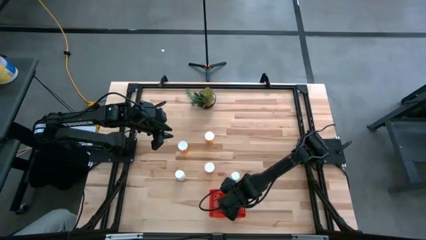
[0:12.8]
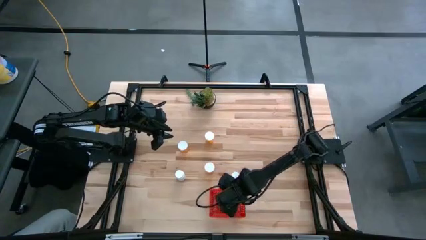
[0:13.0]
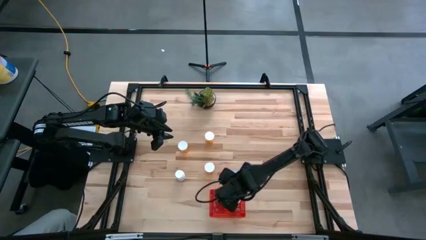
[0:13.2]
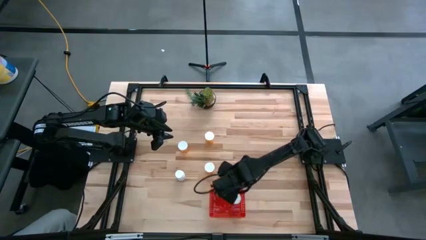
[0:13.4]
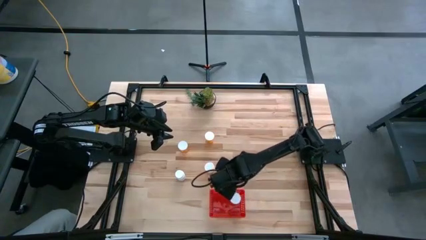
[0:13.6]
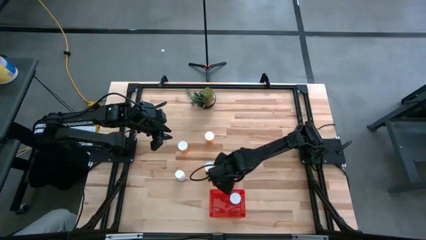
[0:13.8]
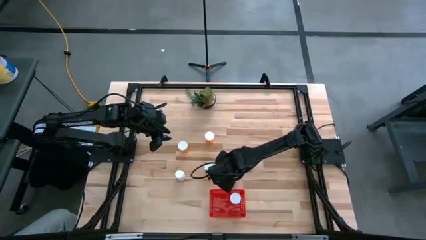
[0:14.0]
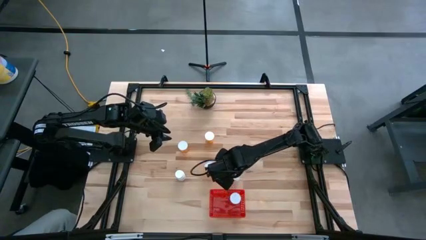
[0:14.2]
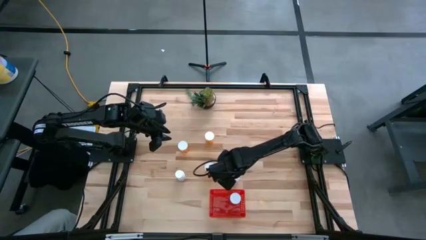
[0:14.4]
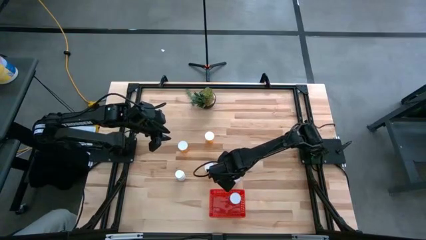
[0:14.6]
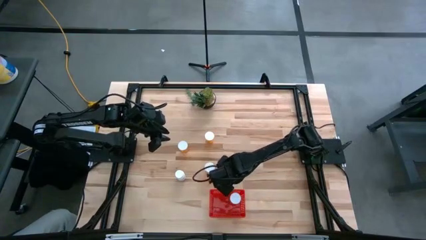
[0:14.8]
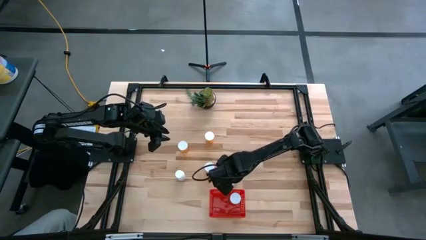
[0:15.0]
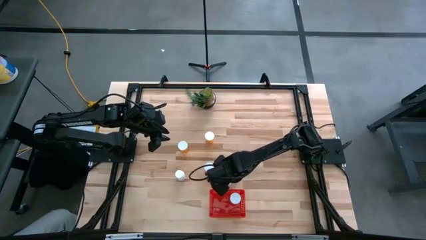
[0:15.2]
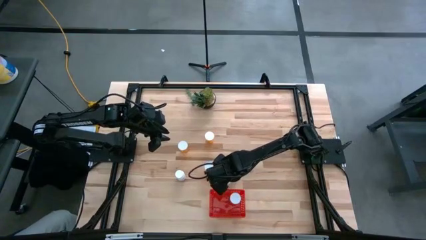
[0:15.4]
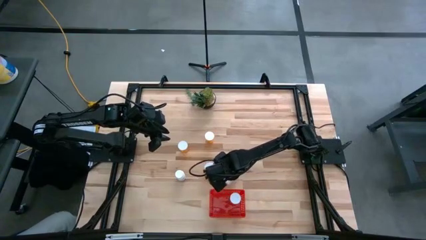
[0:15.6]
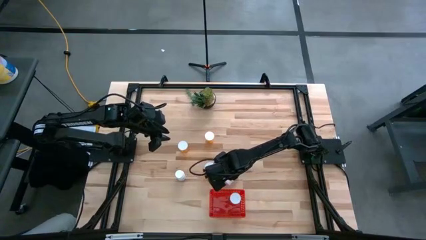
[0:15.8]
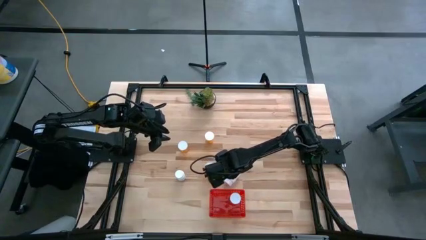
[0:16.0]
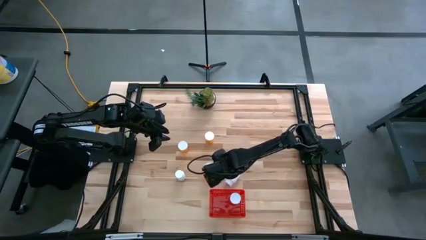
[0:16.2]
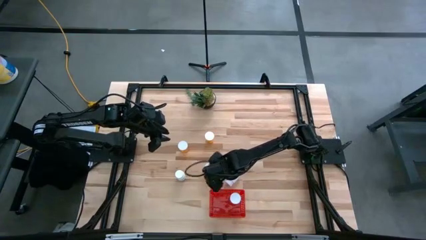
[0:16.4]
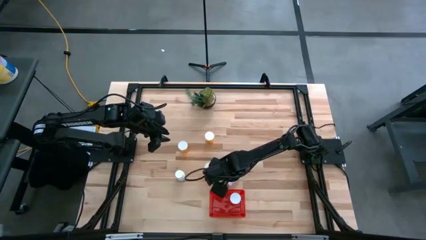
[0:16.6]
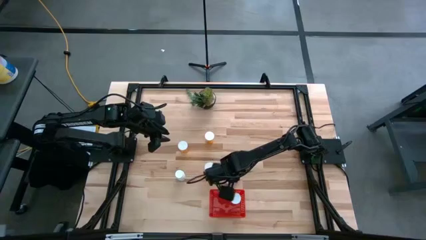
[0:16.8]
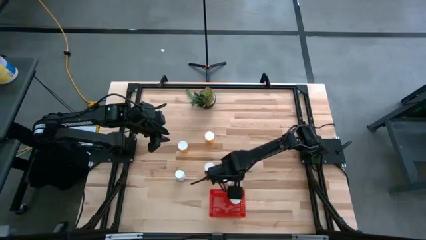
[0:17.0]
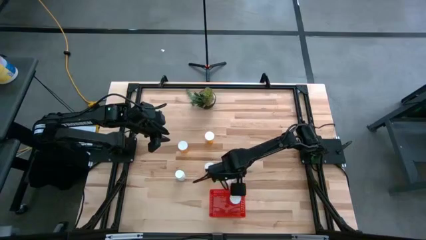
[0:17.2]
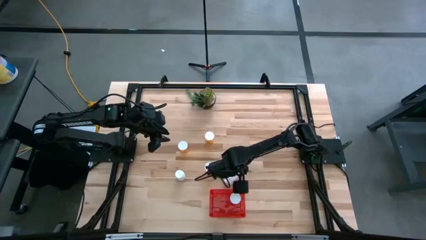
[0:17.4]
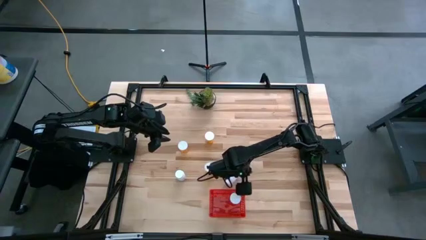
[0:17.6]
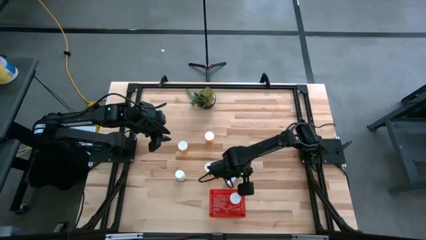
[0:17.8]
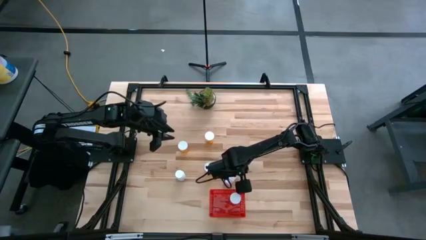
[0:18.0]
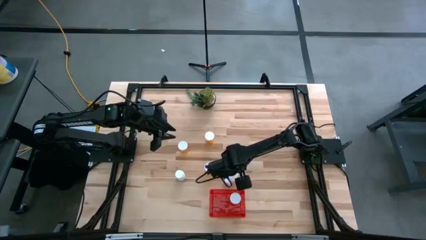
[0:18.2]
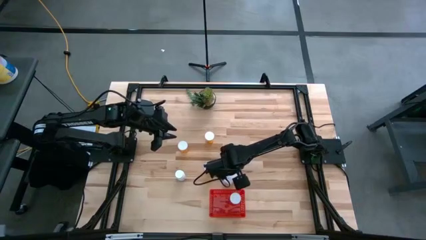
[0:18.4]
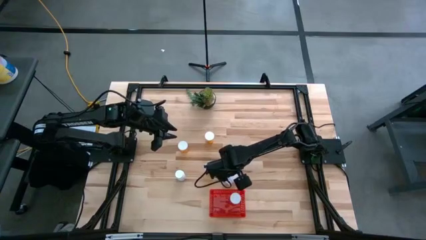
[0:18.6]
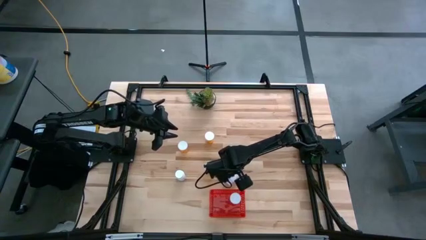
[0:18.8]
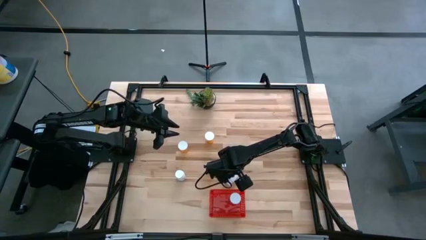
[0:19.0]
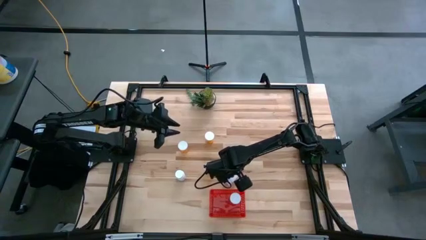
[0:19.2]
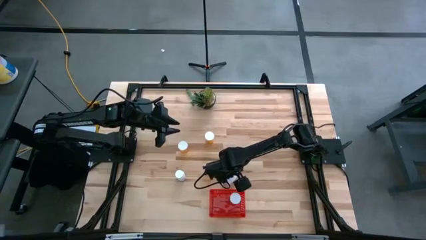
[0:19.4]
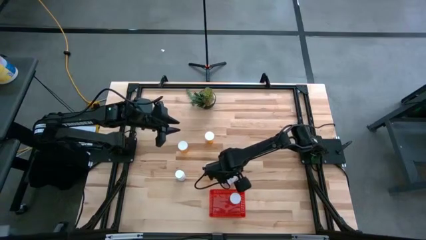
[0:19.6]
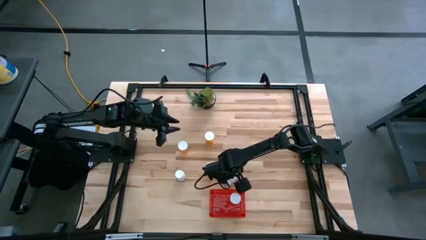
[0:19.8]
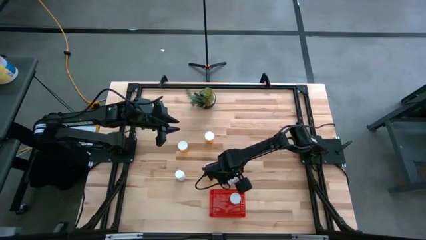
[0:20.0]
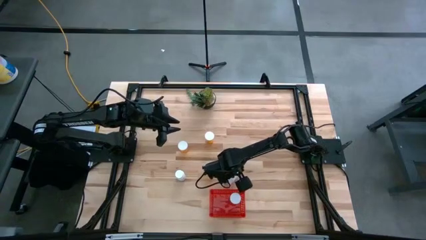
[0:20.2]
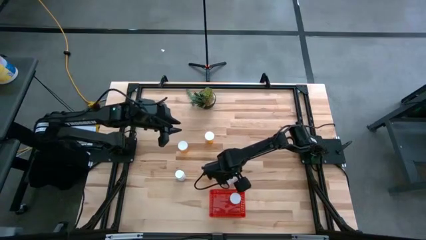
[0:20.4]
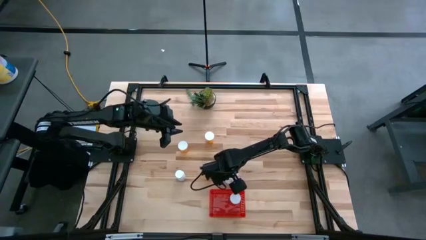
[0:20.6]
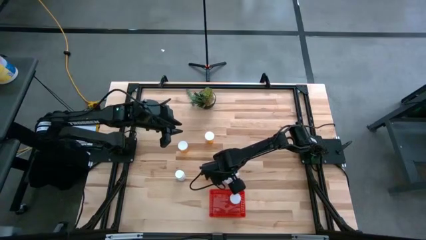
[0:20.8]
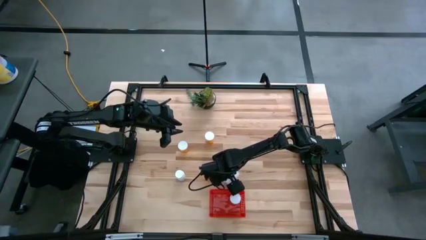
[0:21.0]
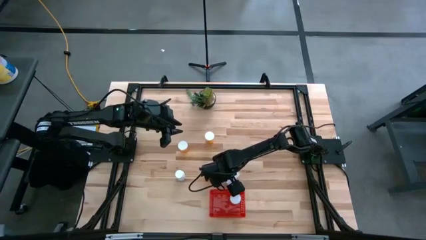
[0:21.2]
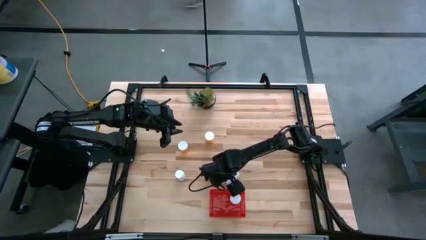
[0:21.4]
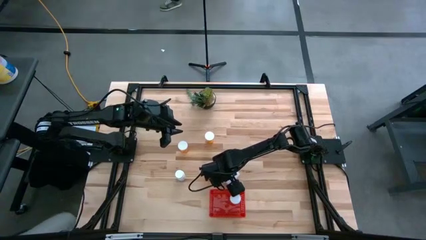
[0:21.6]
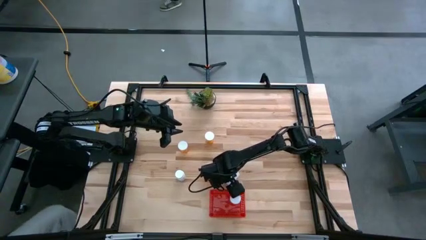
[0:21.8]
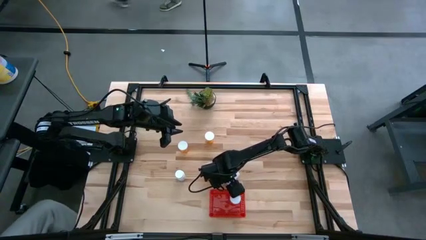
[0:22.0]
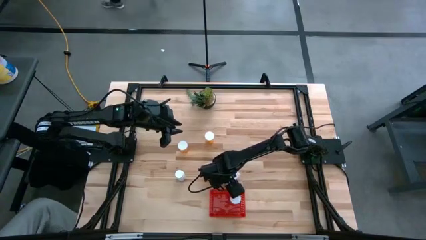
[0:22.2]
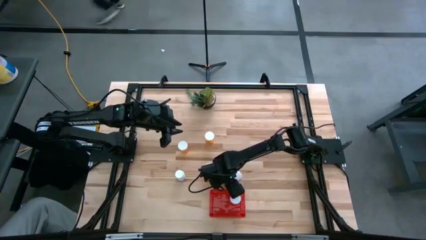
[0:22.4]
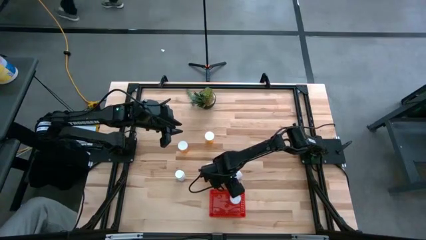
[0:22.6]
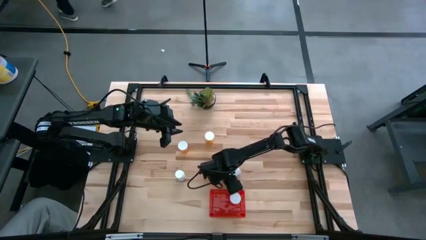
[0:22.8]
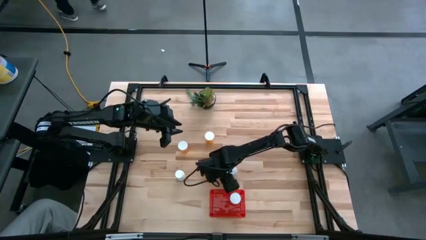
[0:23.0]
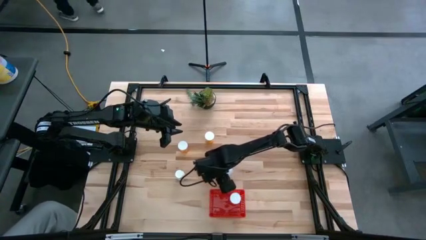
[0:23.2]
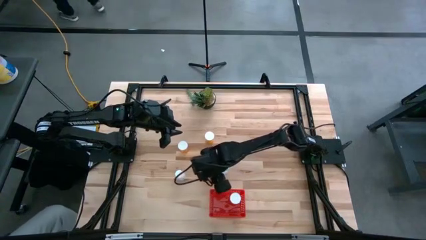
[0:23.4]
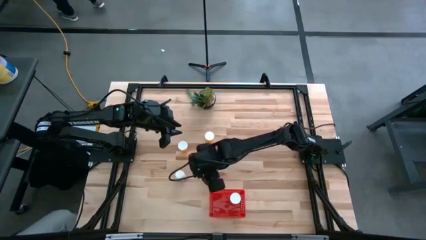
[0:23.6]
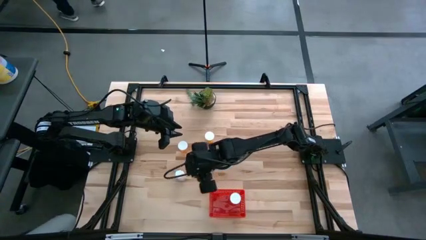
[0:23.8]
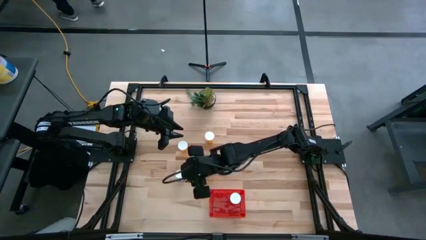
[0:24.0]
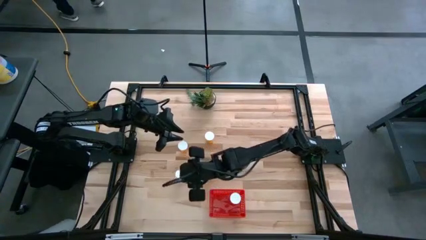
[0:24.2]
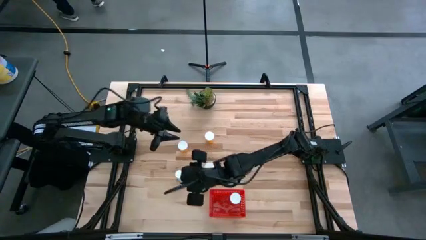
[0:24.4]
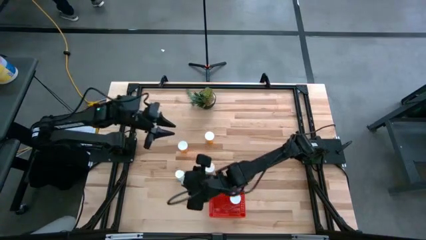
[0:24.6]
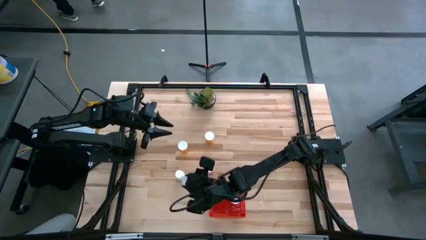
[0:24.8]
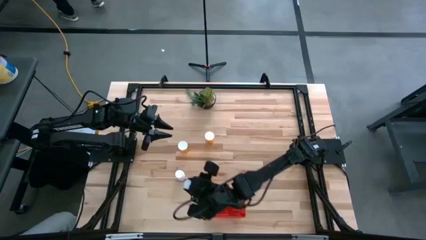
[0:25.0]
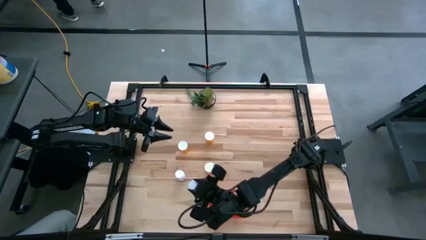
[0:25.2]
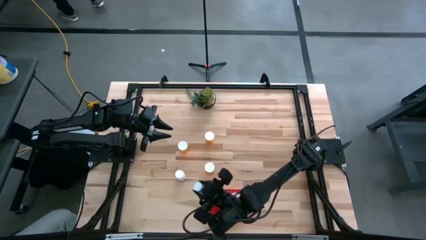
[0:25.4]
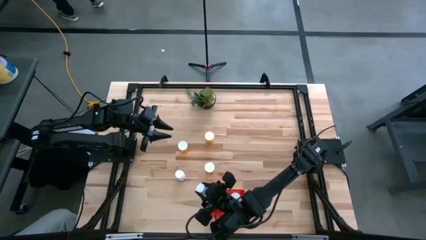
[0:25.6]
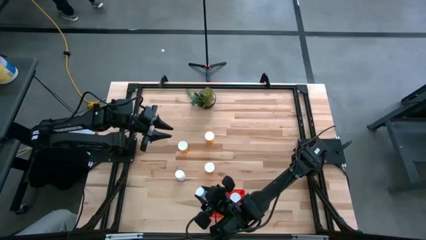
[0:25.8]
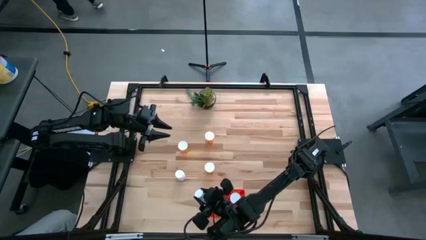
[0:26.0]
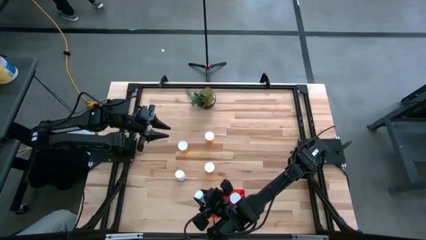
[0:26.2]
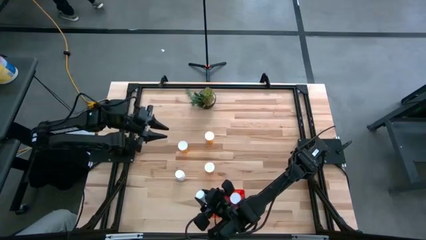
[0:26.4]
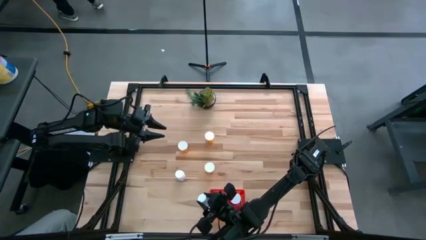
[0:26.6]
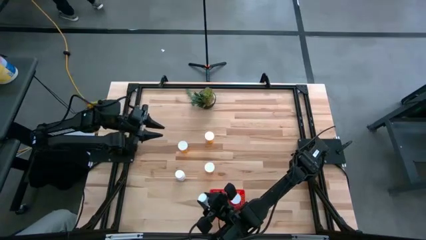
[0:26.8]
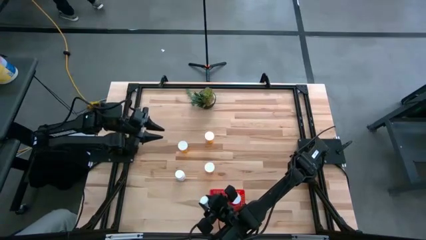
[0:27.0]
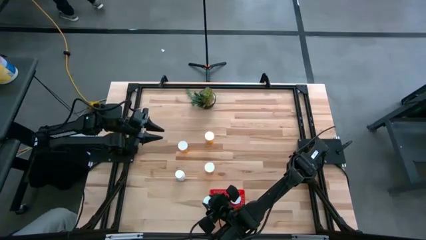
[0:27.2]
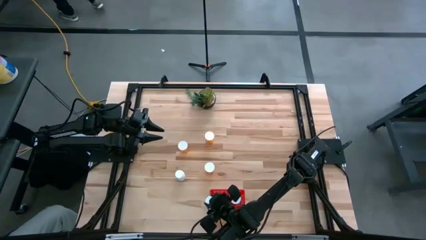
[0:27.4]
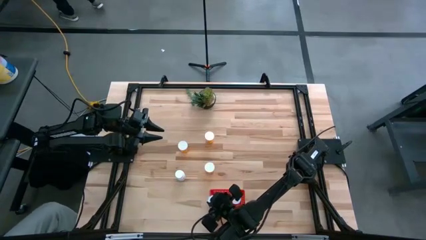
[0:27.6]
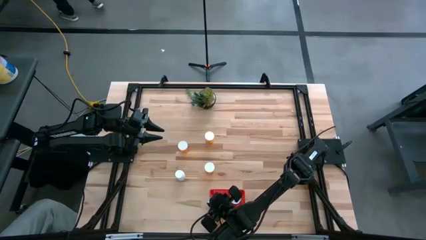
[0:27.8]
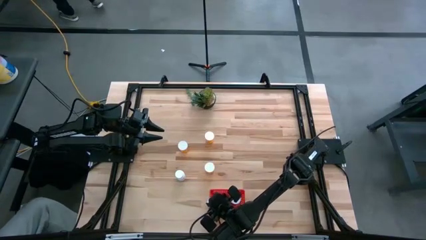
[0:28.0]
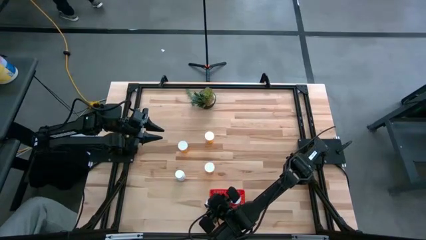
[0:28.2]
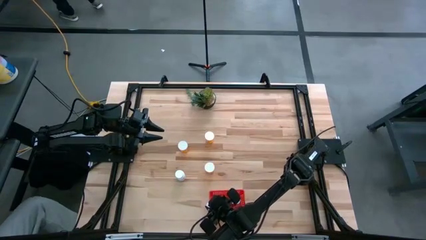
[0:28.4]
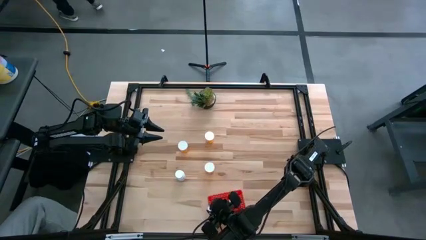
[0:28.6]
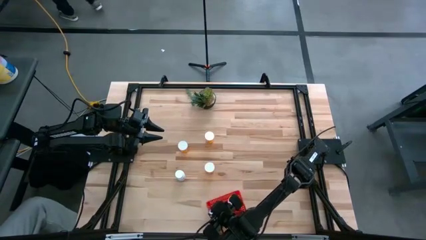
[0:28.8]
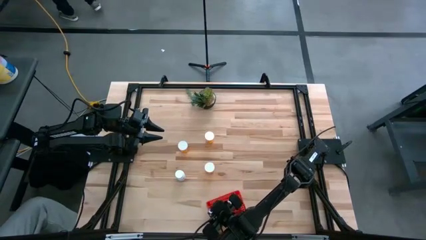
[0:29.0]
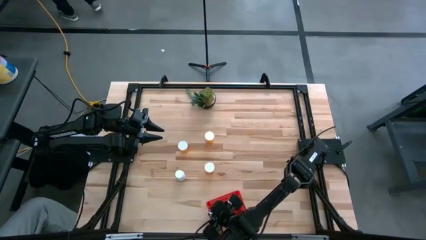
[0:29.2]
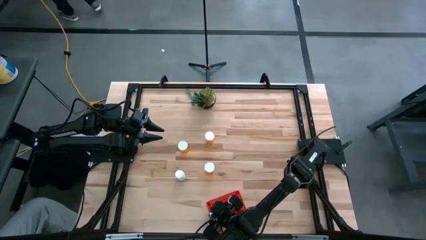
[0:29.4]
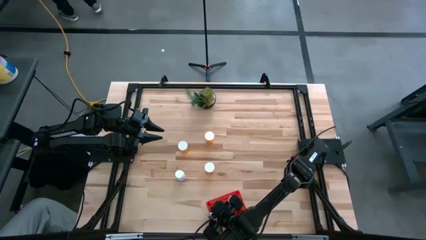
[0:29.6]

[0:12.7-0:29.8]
Task: Pick and place pill bottles into a basket
Put the right white pill bottle into the red bin
